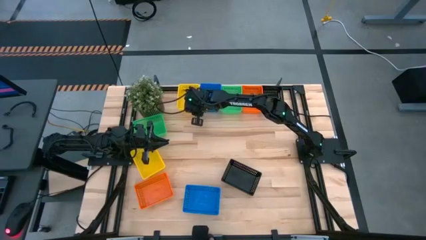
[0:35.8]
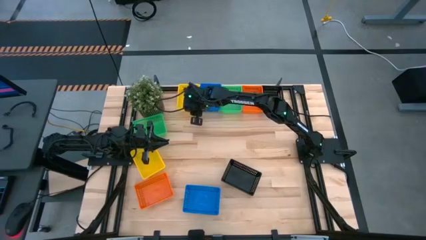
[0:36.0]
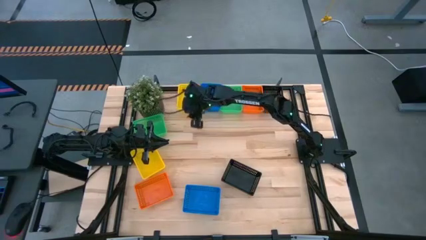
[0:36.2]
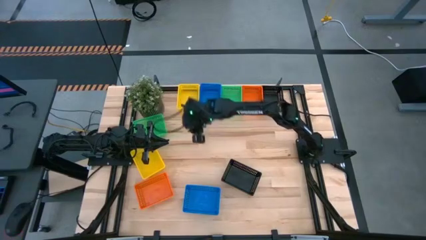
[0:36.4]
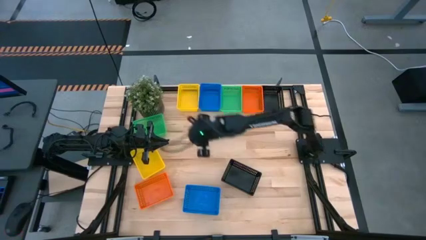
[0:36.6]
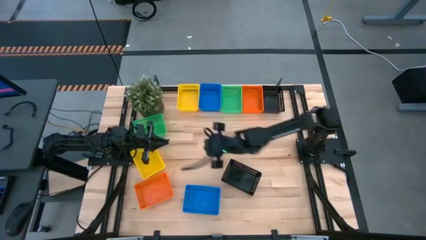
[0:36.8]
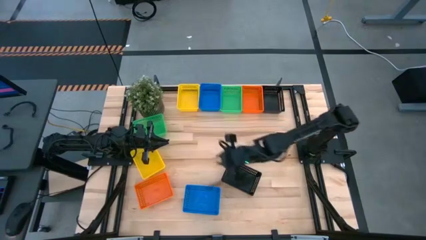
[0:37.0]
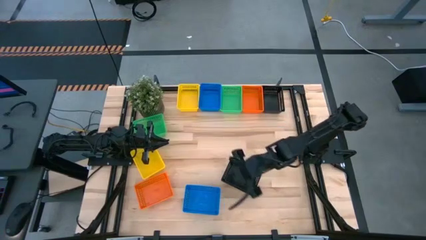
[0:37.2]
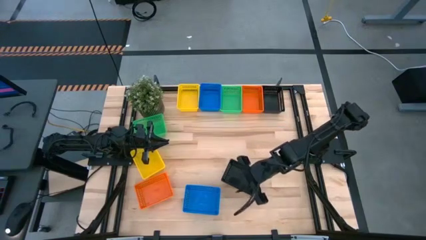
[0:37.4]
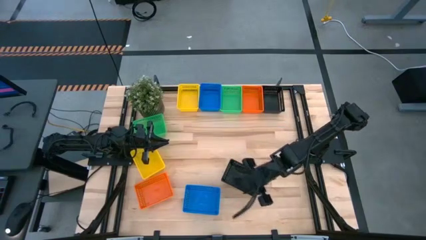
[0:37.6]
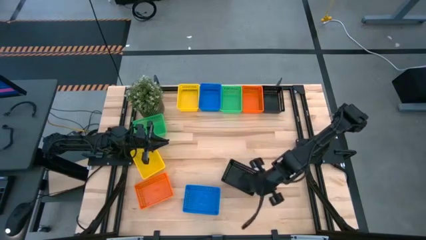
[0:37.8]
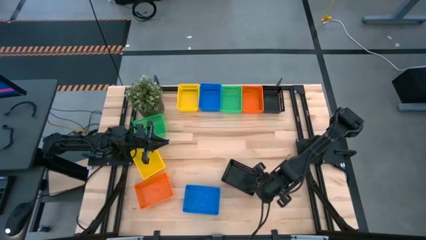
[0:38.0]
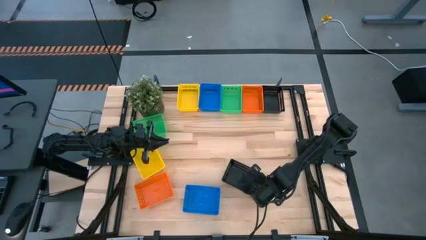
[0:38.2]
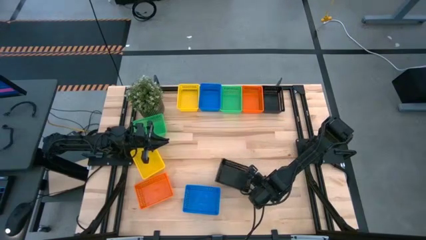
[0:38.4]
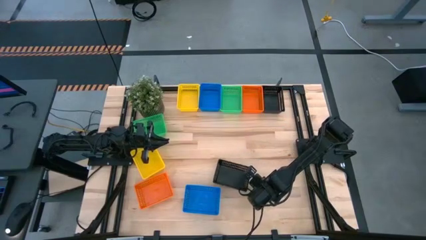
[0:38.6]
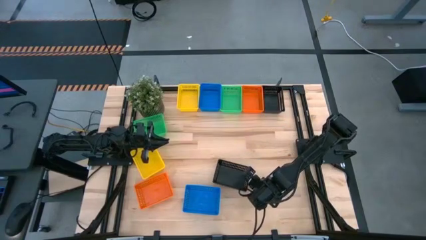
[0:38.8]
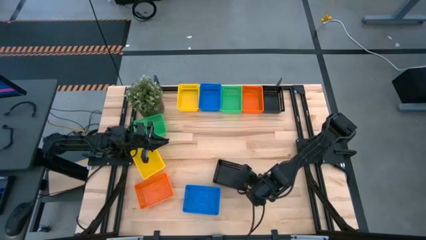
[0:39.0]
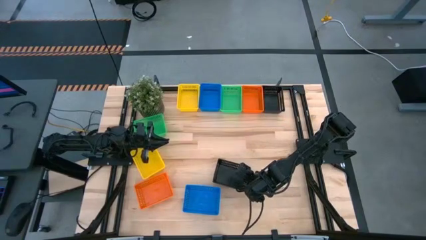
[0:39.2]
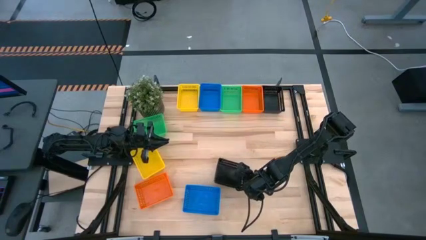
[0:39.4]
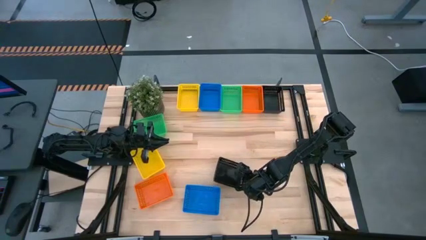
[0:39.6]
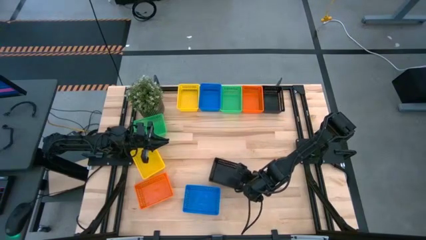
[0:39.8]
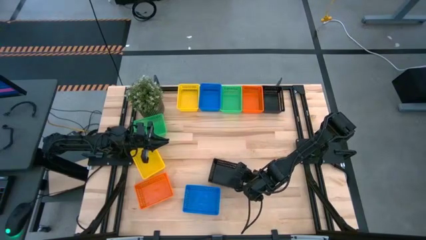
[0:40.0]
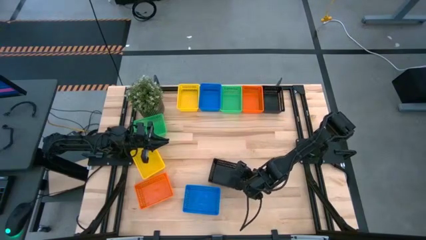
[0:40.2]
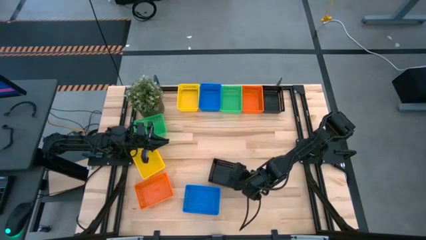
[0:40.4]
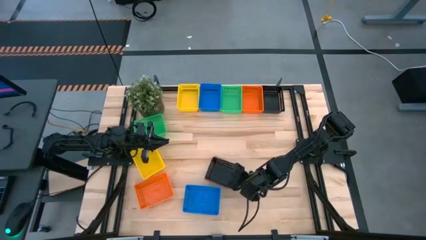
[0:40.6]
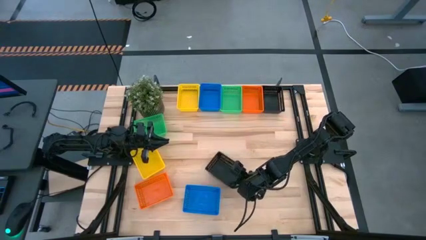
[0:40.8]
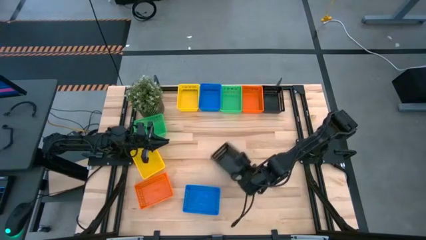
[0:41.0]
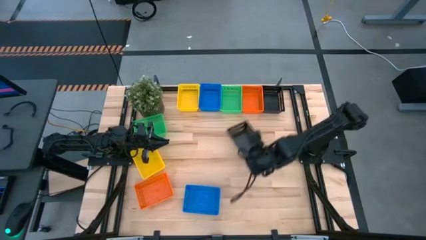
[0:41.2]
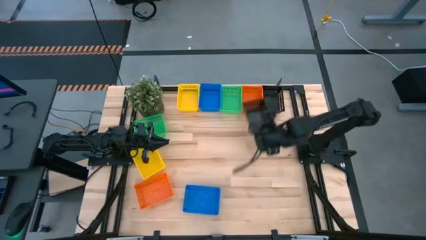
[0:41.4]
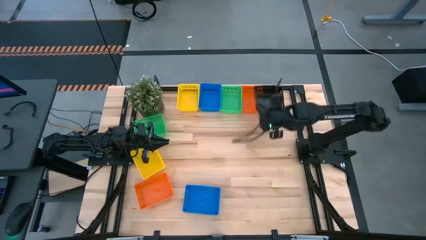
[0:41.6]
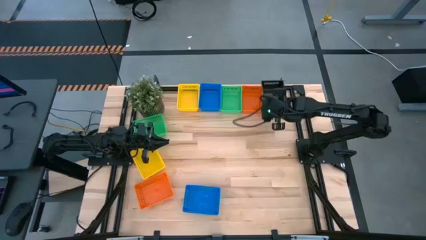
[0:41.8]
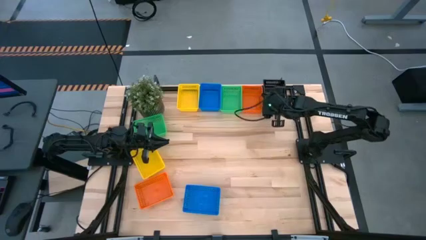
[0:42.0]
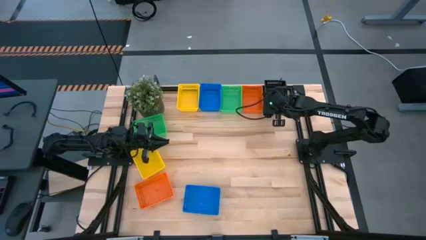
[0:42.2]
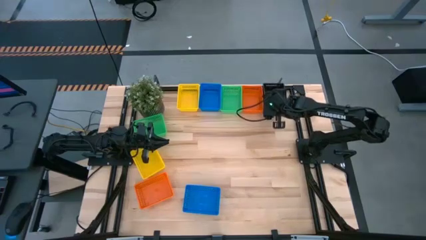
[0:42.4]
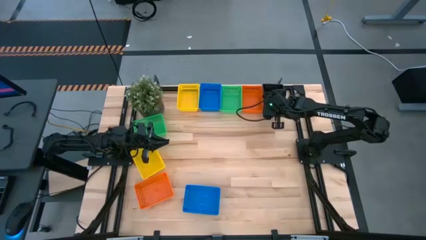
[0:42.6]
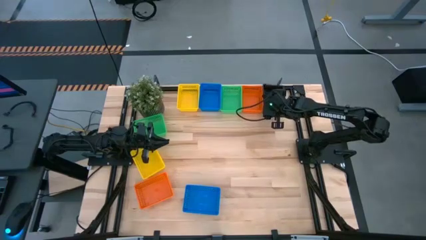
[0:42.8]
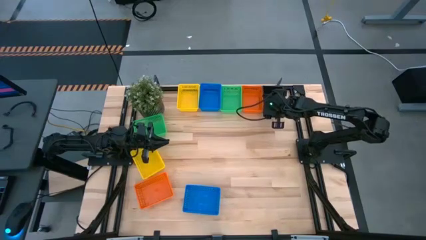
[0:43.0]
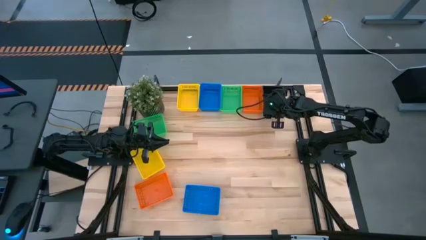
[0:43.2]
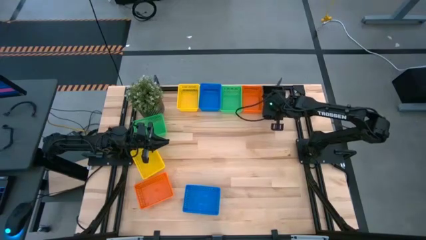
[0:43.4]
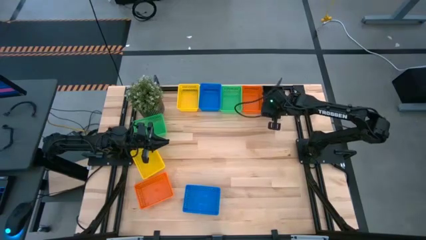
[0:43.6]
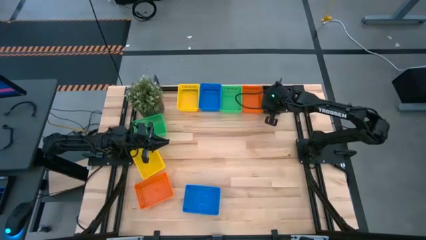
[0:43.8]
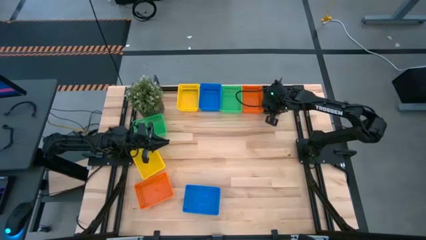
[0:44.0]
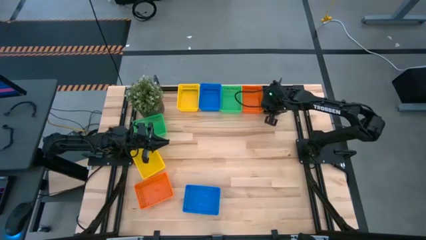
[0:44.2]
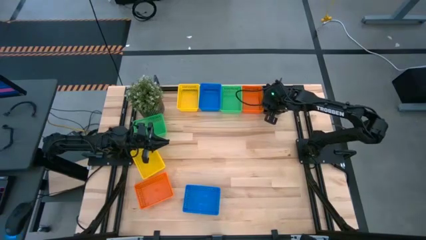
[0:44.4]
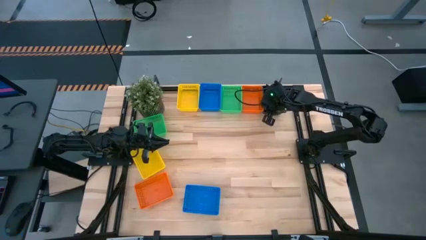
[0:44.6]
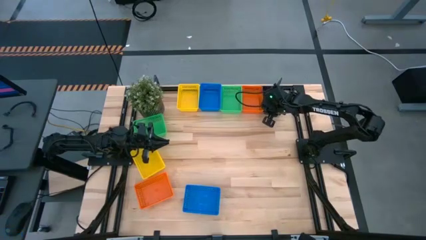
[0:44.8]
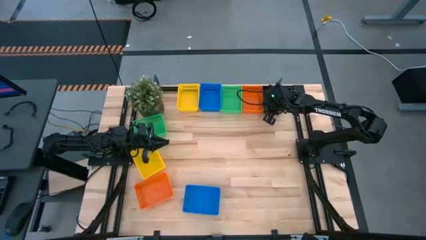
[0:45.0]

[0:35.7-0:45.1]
Stack the bottom black bin on top of the black bin

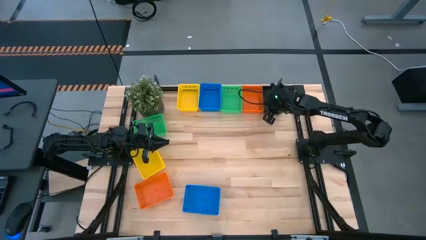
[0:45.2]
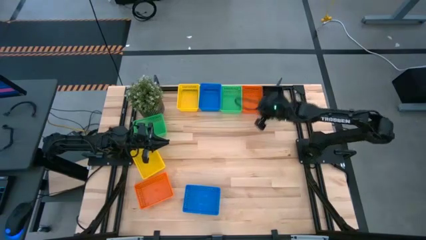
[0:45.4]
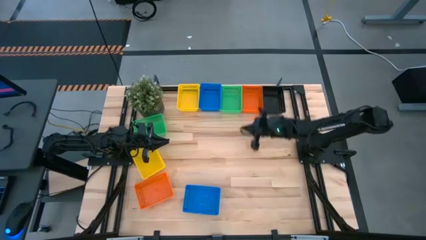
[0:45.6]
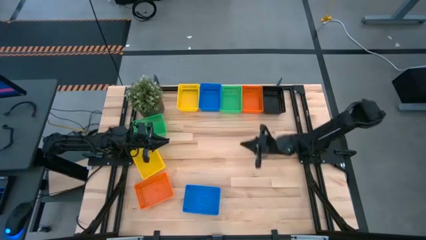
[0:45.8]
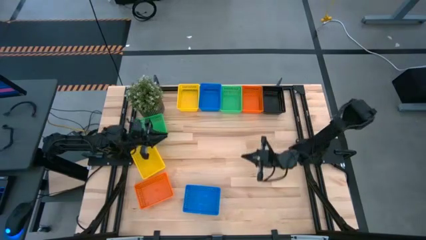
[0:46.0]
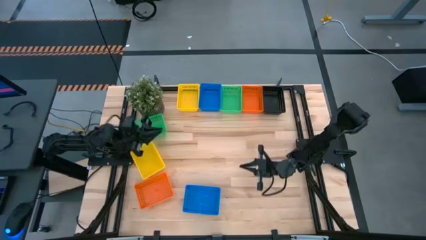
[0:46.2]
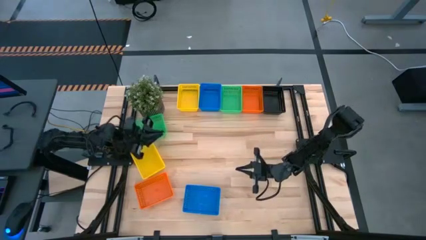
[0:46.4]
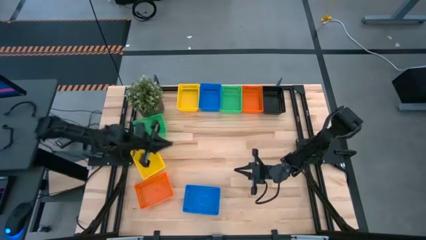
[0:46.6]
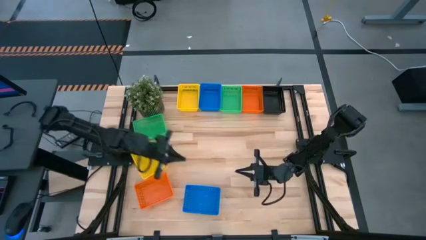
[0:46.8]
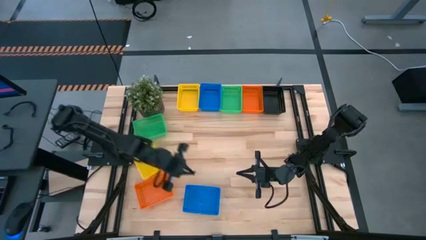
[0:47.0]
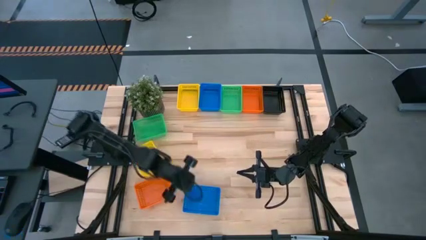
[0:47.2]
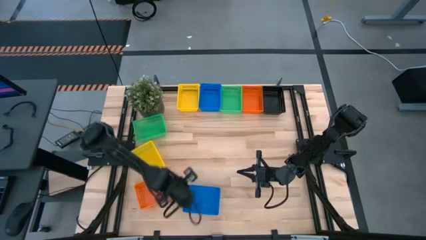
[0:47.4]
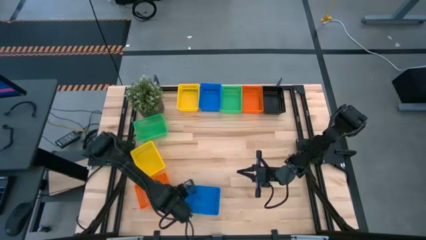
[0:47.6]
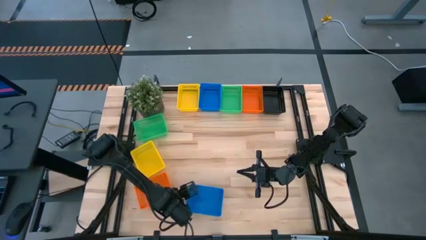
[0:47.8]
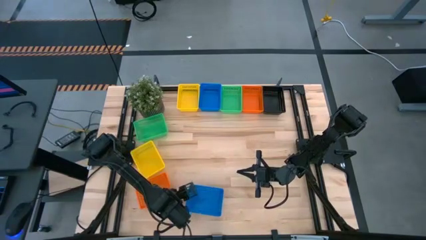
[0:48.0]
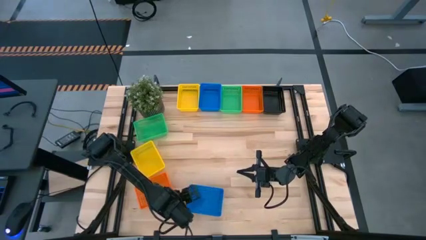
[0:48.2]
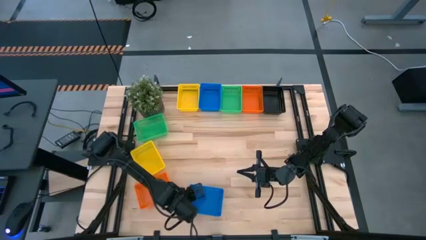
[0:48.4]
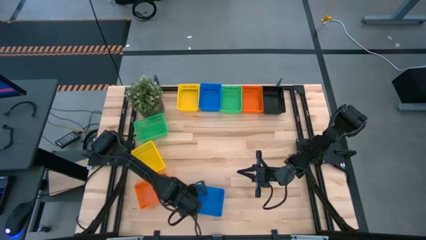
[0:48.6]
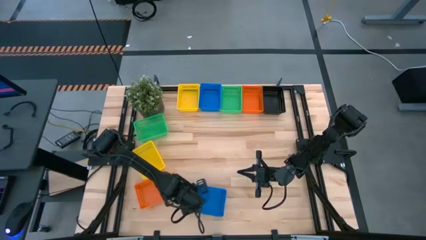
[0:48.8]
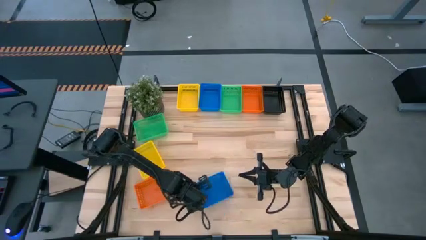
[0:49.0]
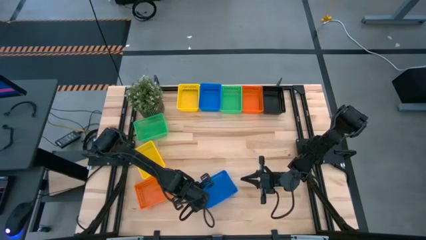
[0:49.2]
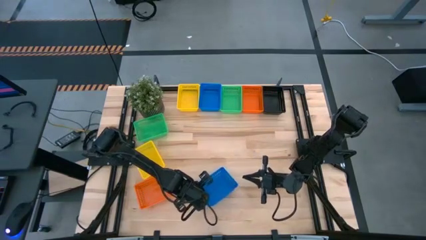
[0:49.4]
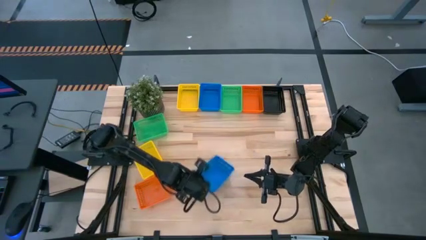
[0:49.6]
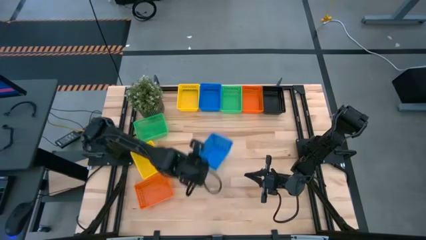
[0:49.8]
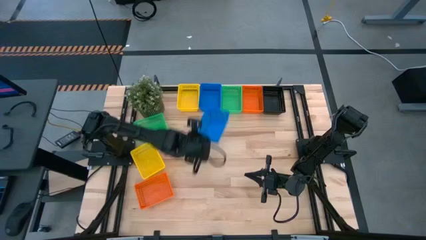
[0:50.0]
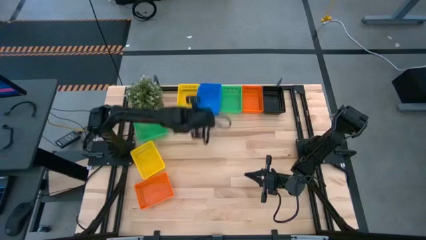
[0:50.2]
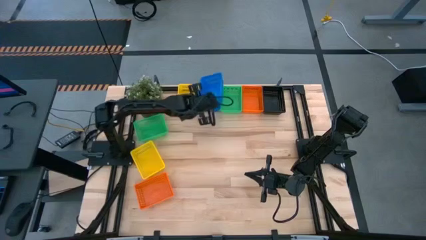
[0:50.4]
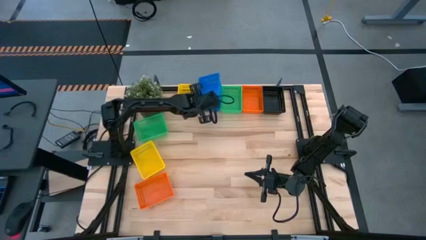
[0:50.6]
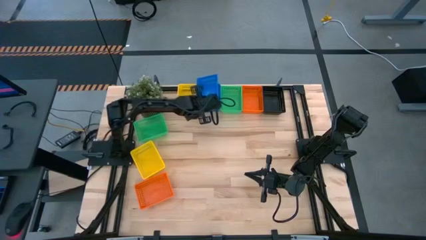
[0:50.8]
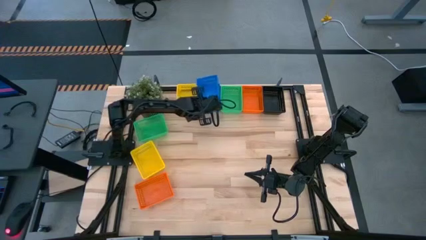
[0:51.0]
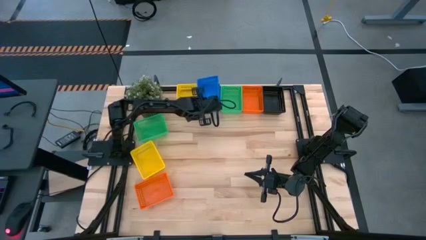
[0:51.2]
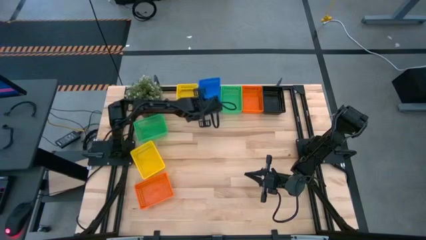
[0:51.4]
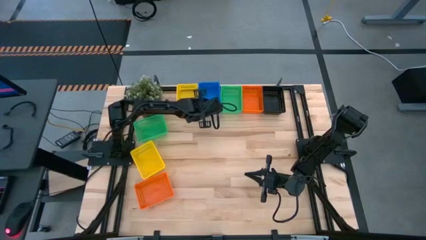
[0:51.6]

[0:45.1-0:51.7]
Stack the bottom blue bin on top of the blue bin
